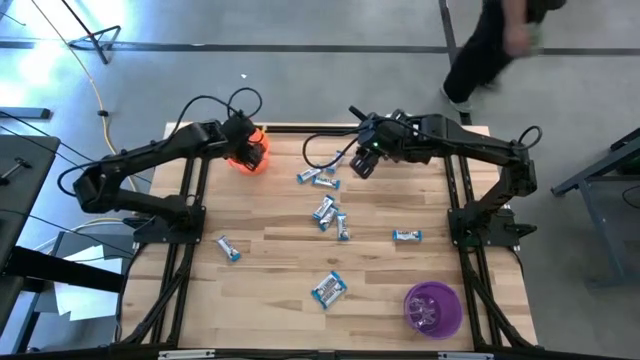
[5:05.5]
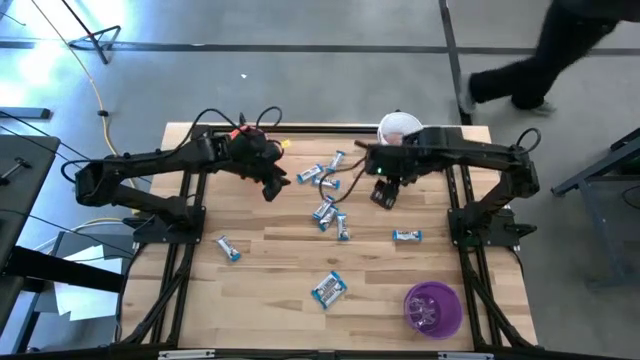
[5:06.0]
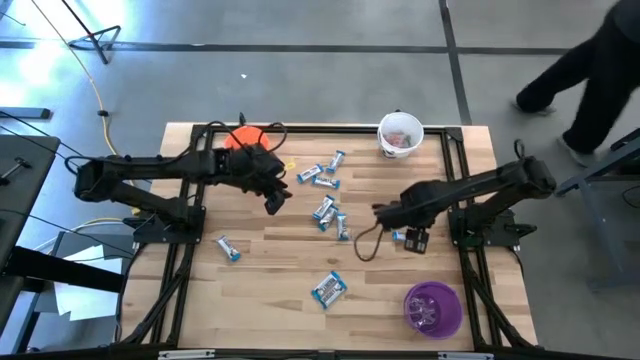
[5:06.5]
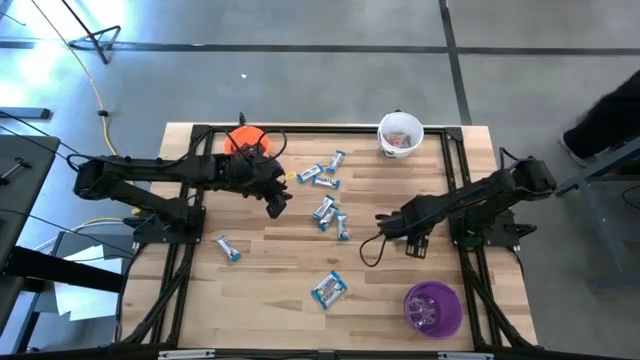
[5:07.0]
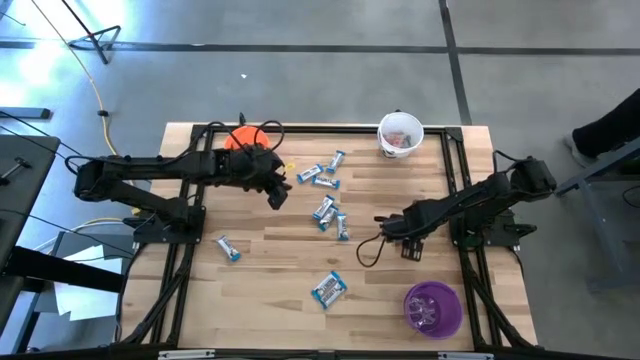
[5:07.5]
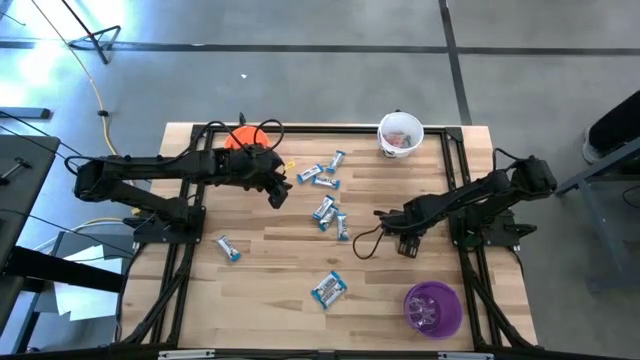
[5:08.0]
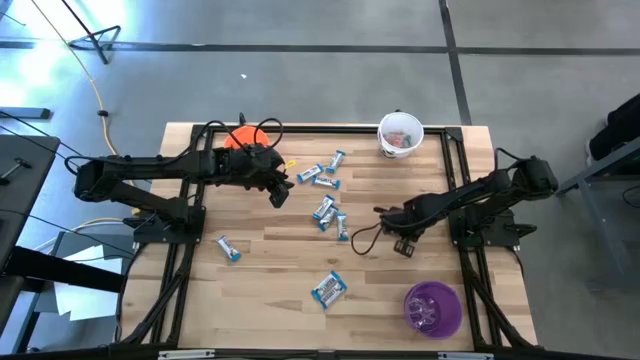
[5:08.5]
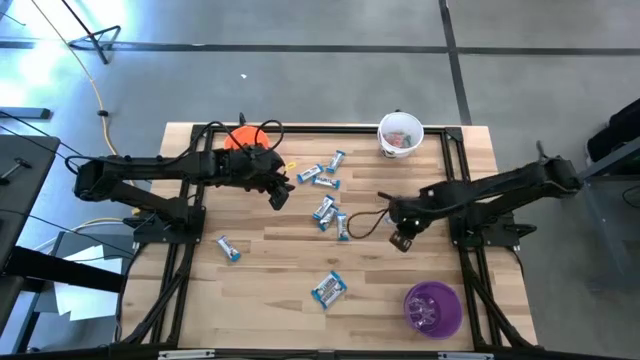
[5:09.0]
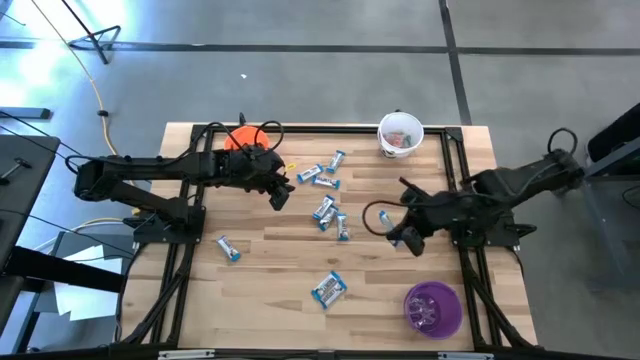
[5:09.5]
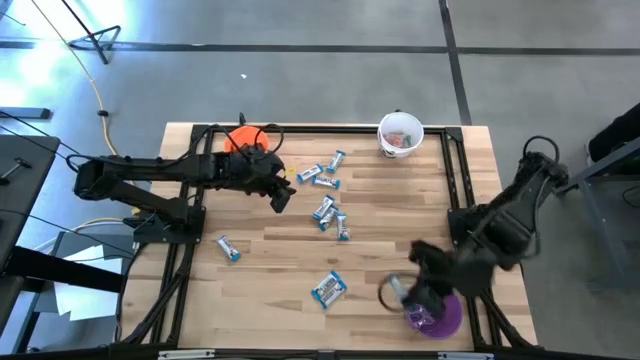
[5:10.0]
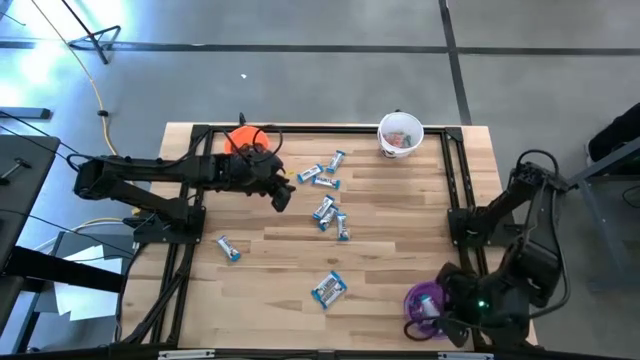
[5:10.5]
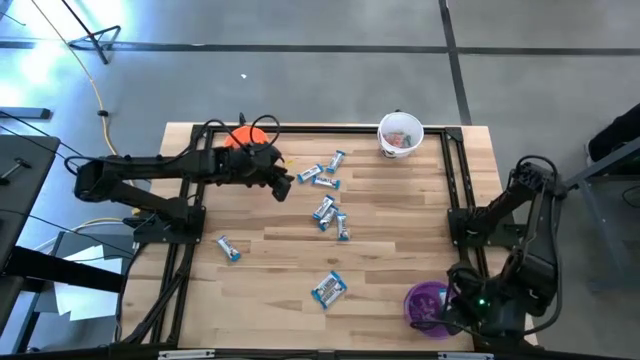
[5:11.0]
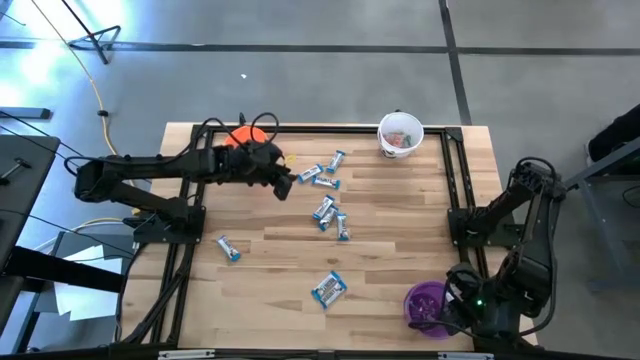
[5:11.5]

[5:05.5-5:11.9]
Task: Sort candy
Put the white chocolate into the violet bucket

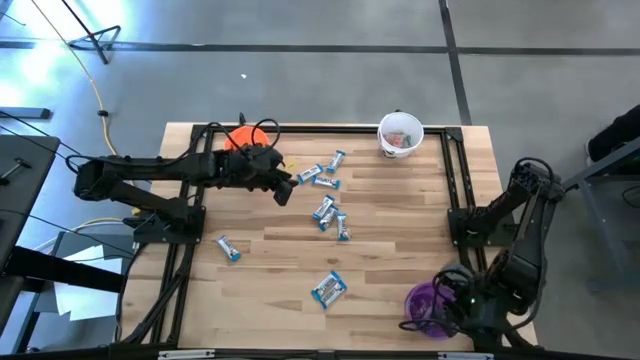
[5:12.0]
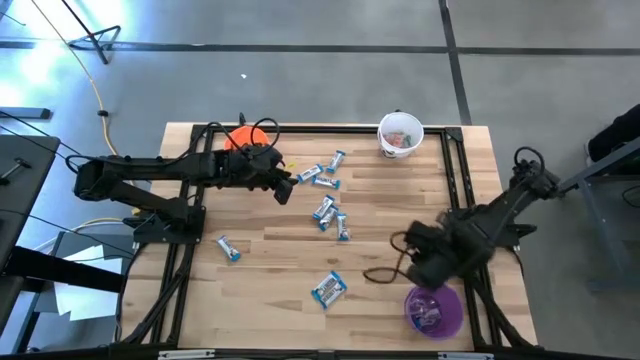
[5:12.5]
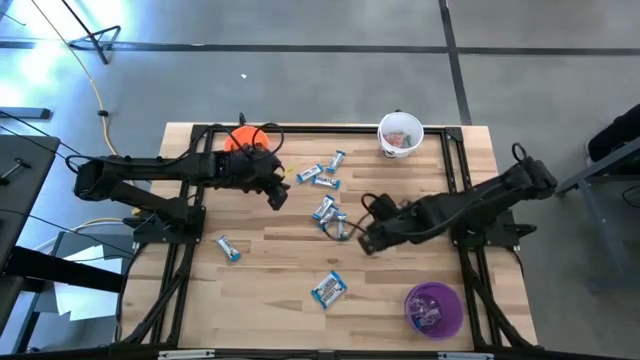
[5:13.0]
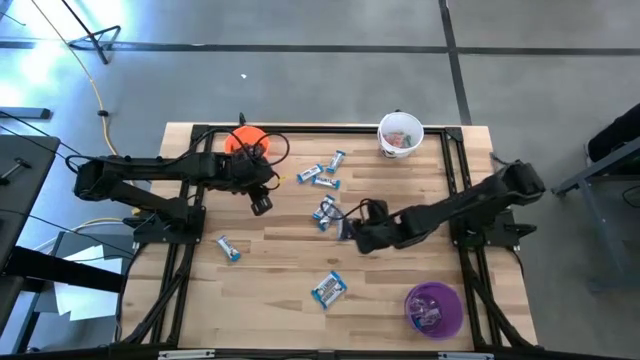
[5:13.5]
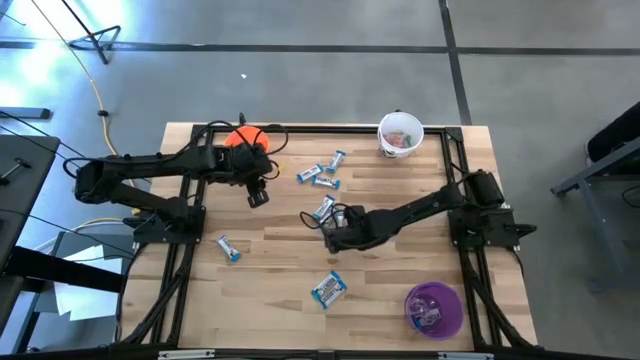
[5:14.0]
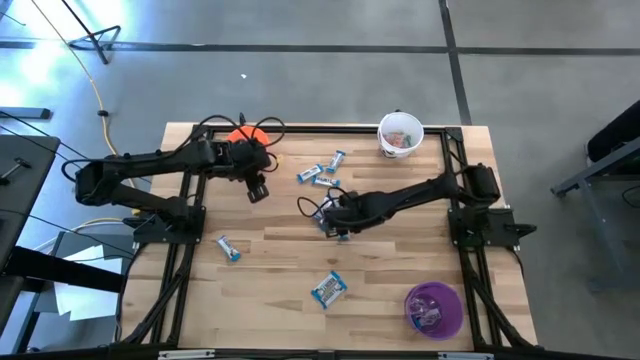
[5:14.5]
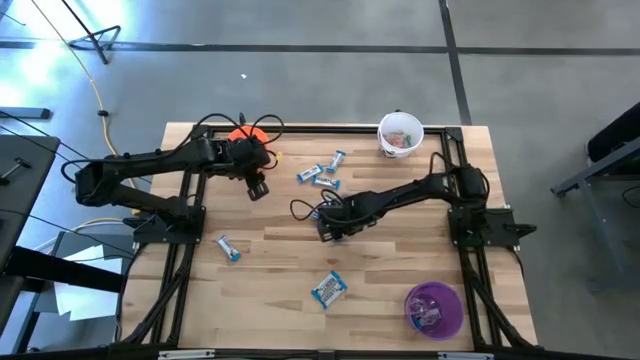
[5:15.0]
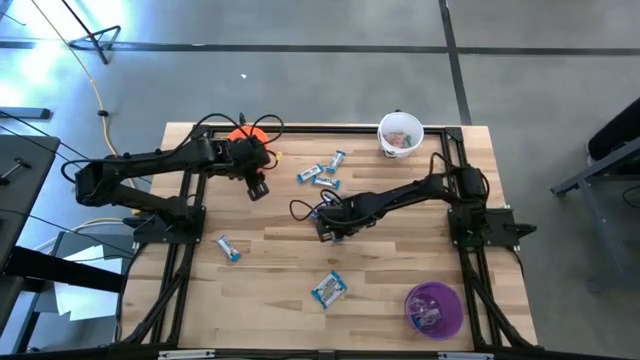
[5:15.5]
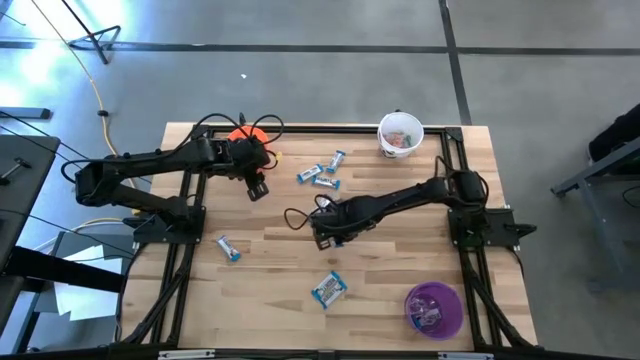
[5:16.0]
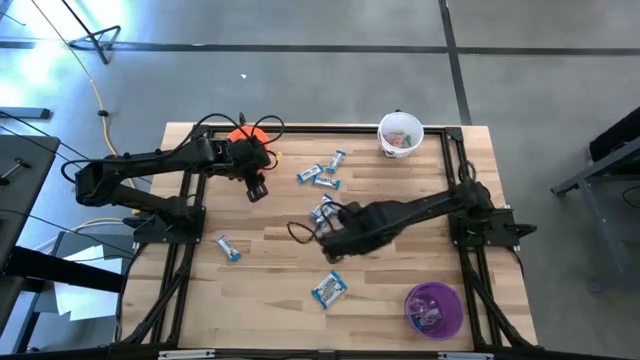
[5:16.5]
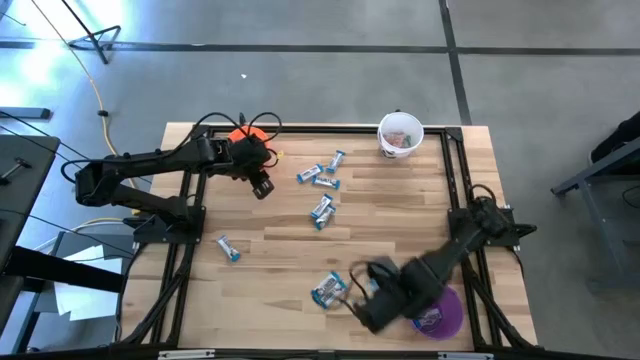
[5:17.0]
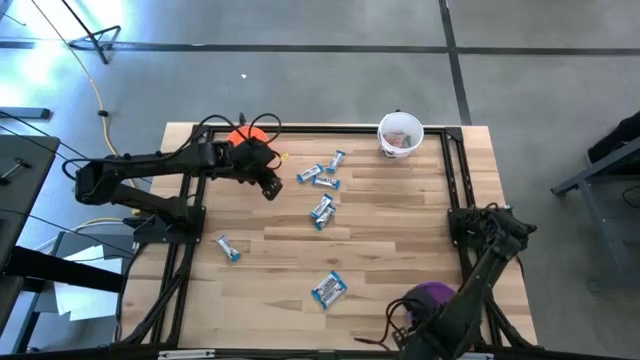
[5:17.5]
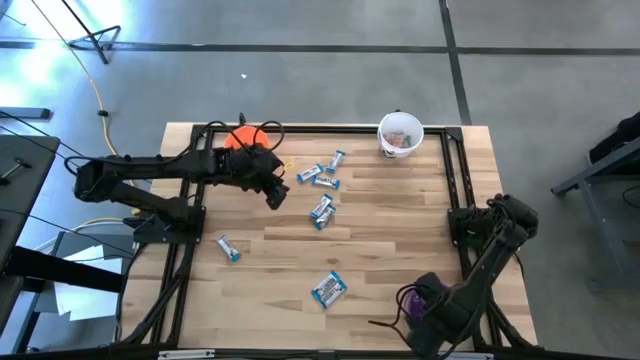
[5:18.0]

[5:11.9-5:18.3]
Put the white chocolate into the violet bucket

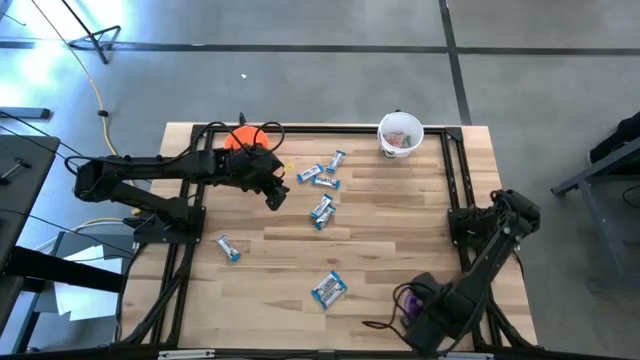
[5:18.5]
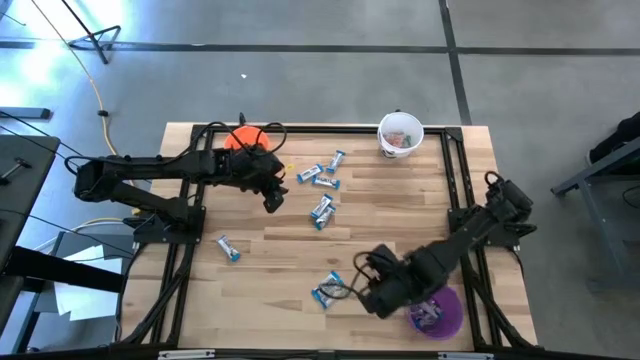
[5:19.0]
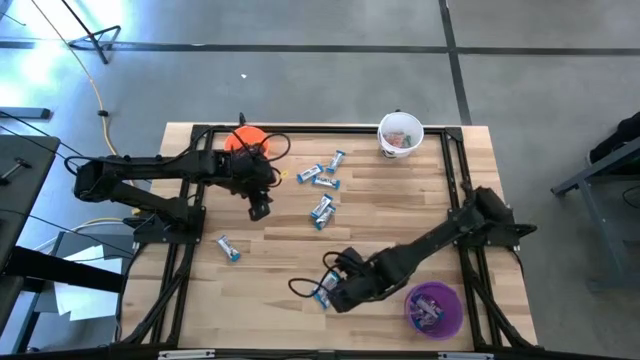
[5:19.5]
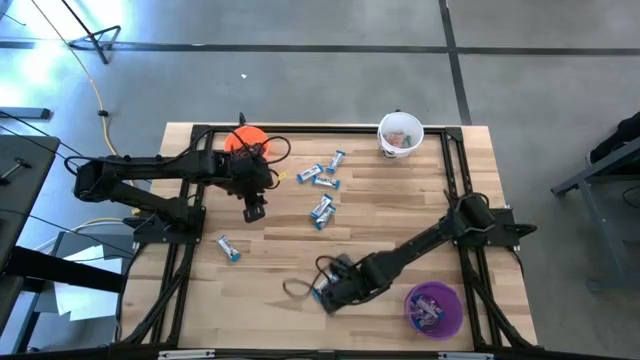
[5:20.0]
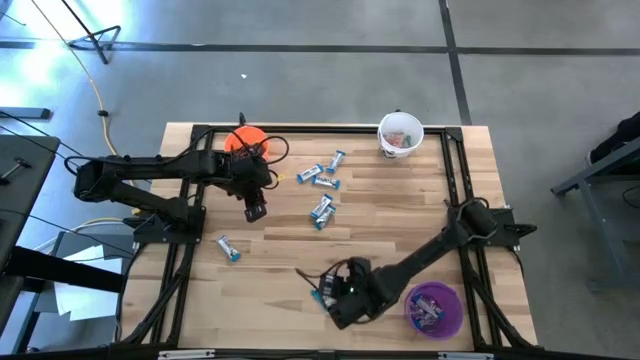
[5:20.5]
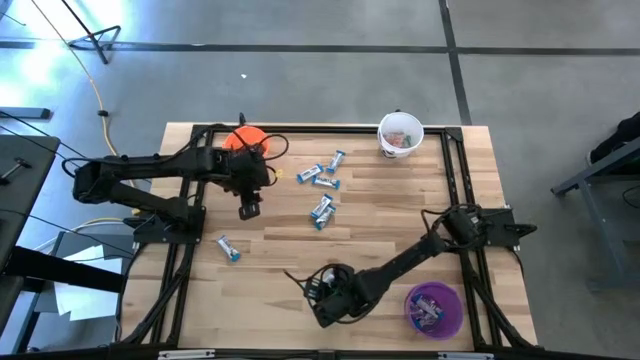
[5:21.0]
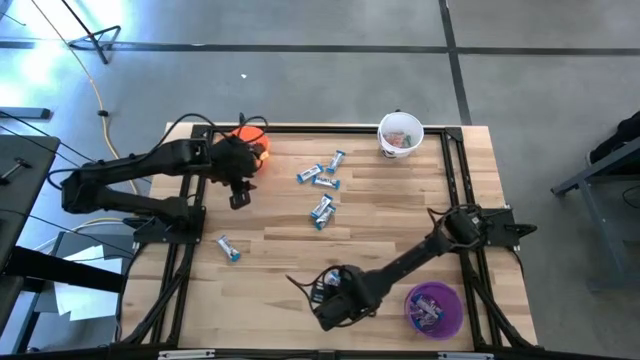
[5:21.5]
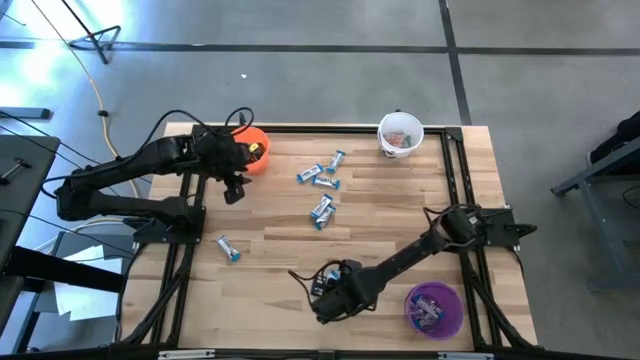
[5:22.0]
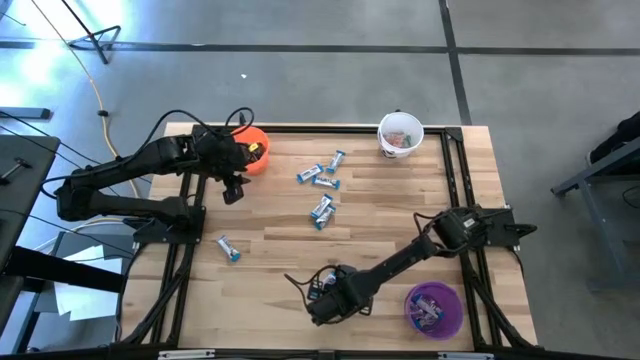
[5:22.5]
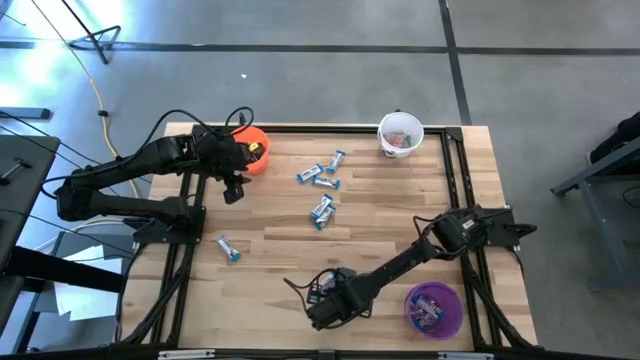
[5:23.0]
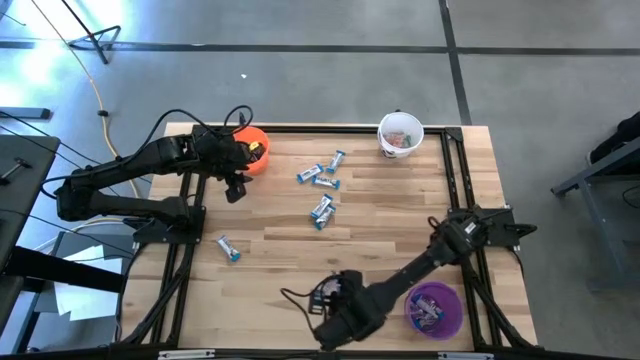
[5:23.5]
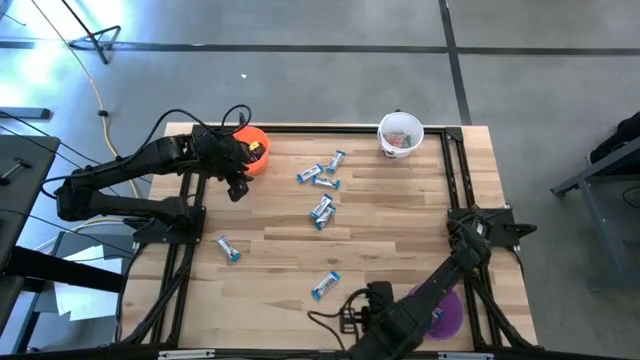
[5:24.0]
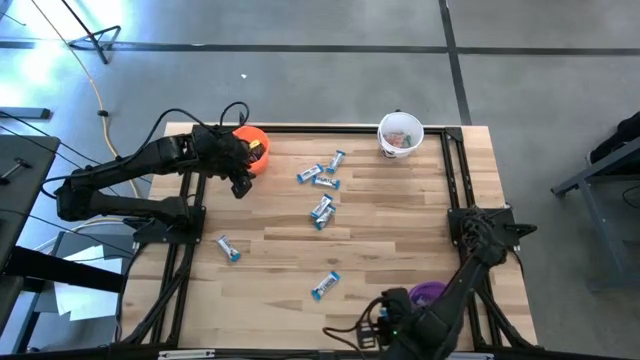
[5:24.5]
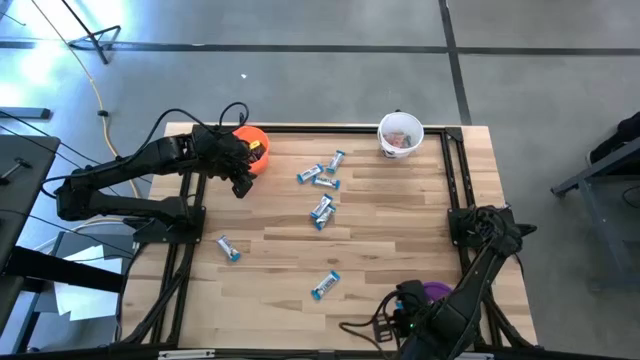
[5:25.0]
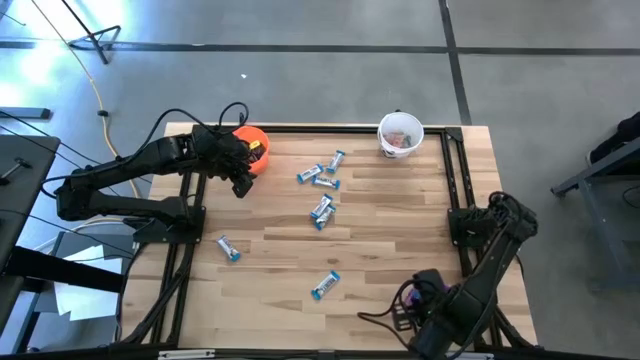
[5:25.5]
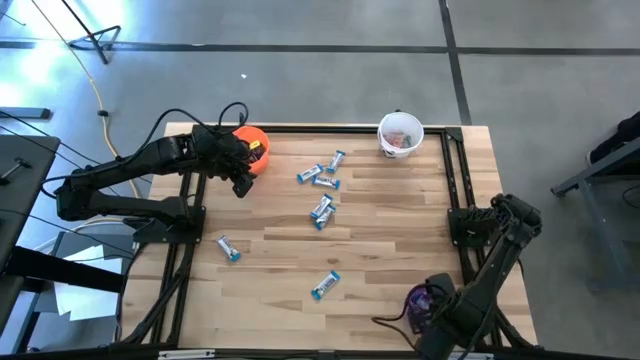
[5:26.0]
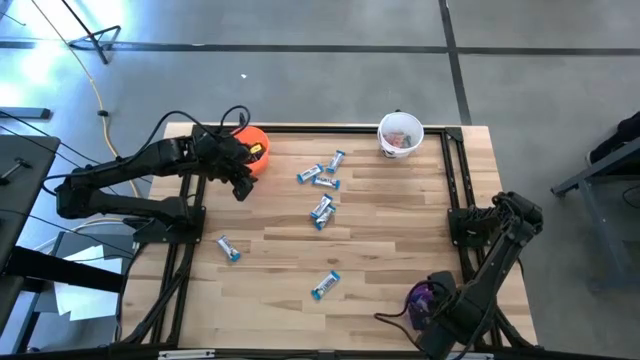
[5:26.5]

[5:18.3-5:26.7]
Put the white chocolate into the violet bucket
